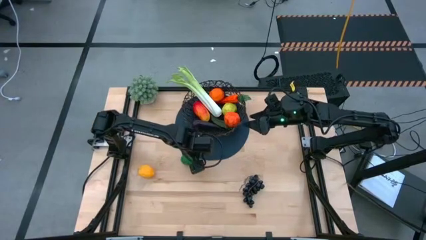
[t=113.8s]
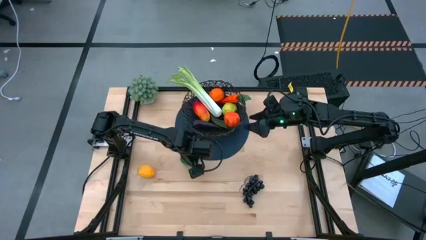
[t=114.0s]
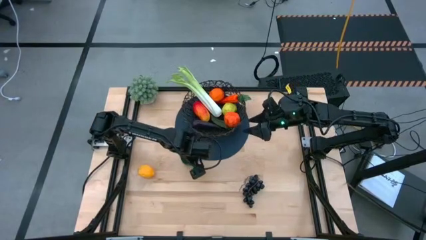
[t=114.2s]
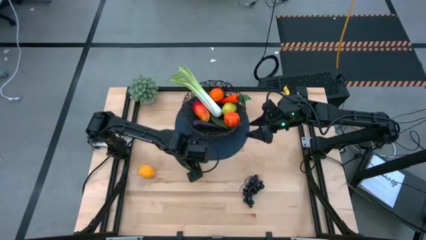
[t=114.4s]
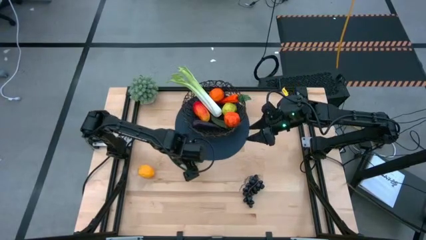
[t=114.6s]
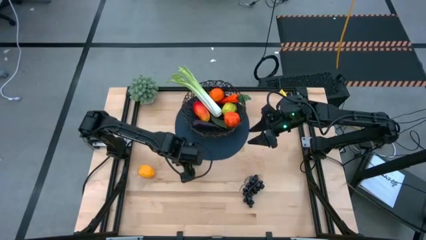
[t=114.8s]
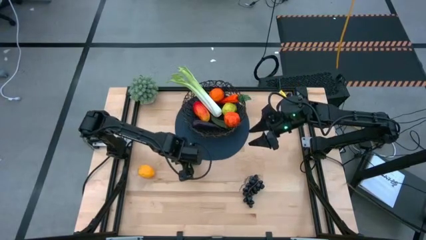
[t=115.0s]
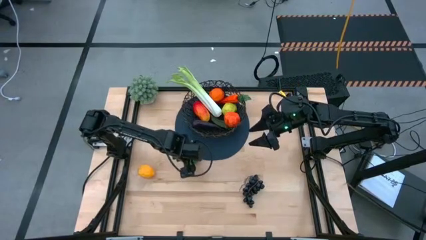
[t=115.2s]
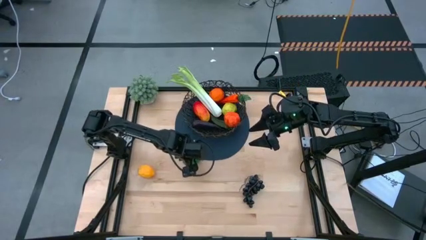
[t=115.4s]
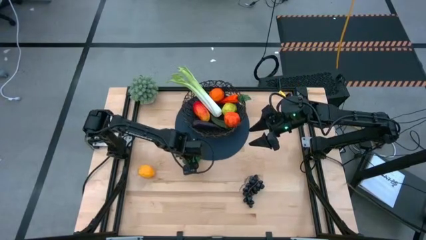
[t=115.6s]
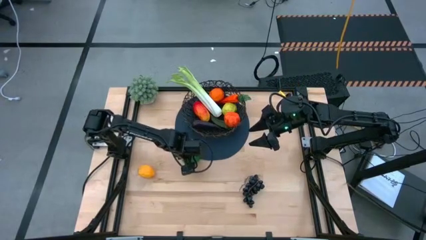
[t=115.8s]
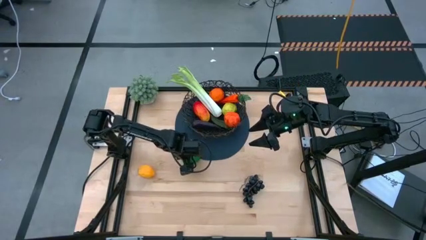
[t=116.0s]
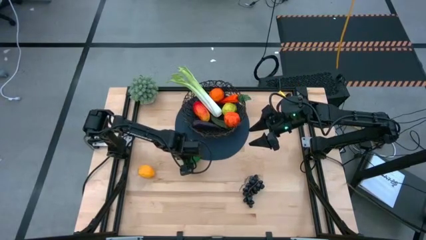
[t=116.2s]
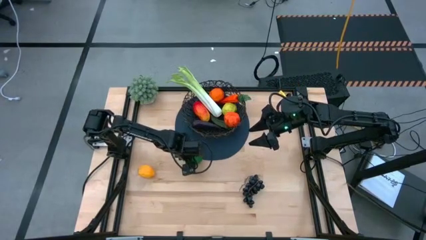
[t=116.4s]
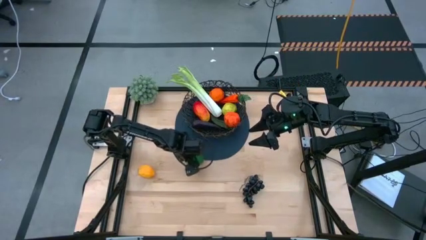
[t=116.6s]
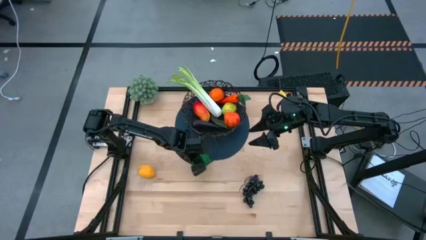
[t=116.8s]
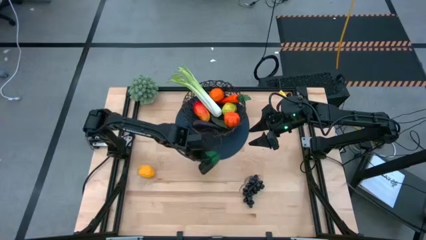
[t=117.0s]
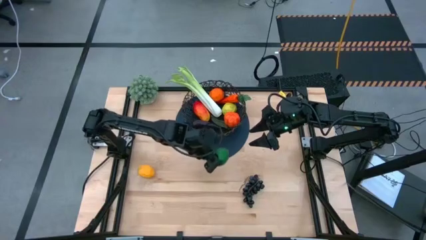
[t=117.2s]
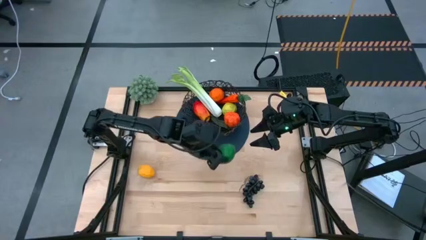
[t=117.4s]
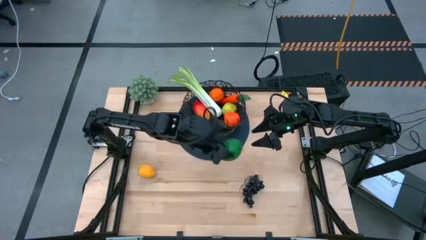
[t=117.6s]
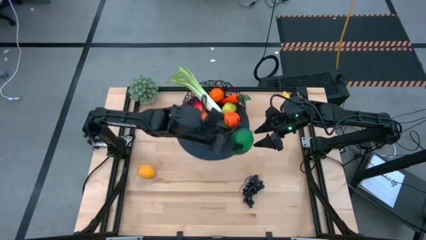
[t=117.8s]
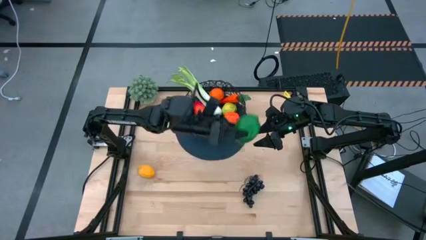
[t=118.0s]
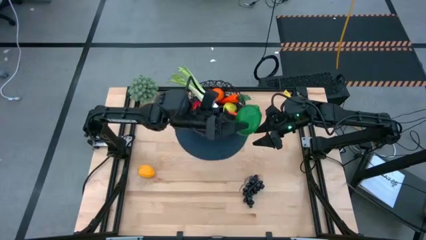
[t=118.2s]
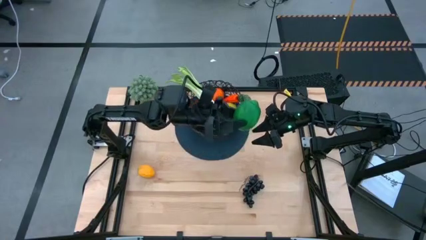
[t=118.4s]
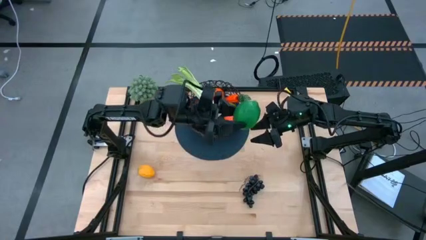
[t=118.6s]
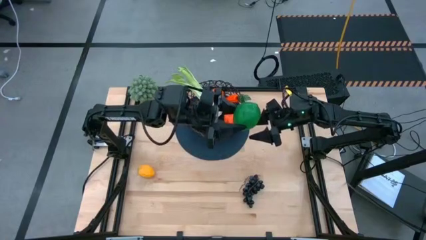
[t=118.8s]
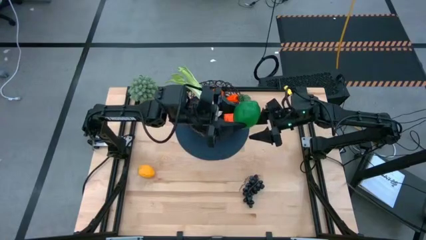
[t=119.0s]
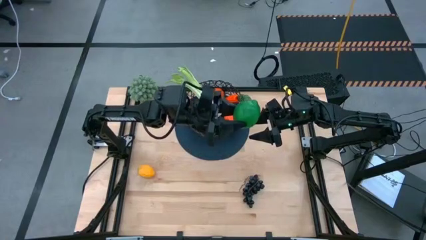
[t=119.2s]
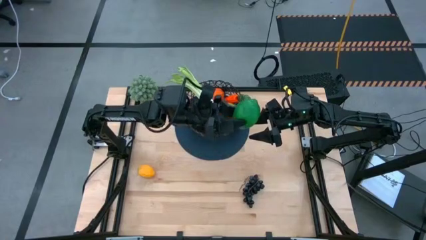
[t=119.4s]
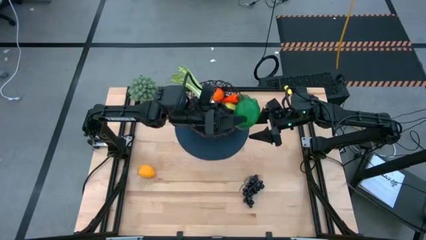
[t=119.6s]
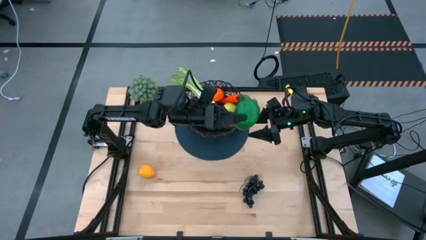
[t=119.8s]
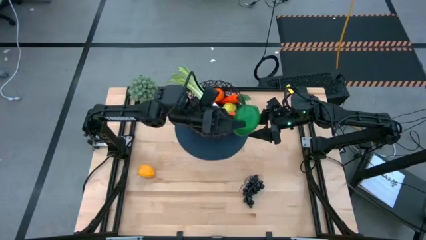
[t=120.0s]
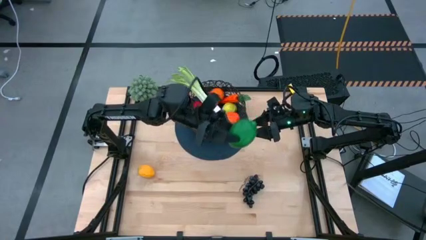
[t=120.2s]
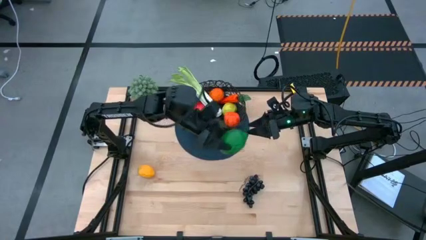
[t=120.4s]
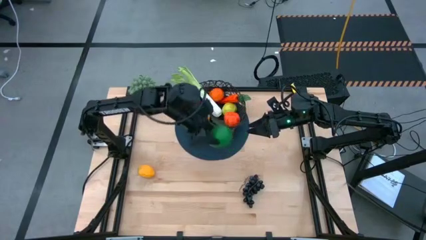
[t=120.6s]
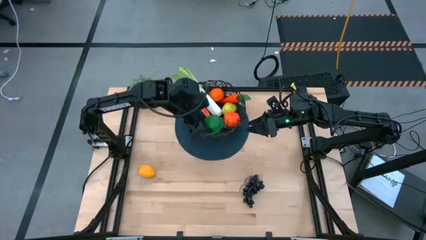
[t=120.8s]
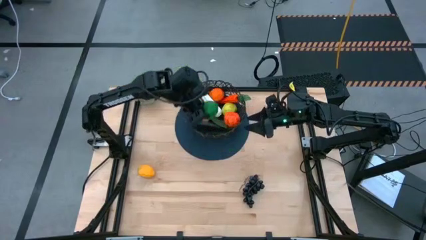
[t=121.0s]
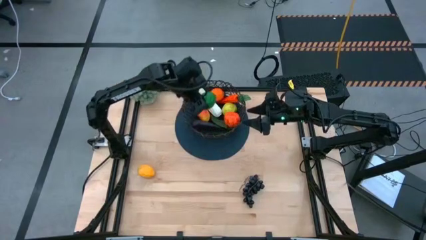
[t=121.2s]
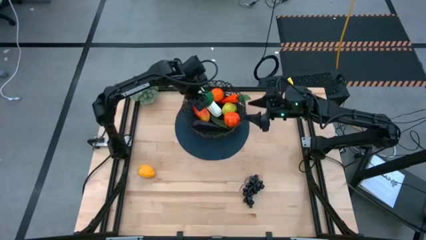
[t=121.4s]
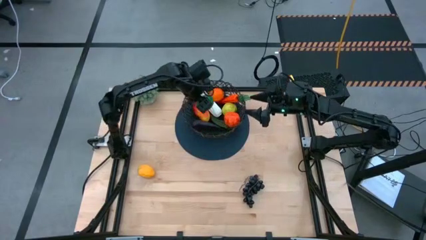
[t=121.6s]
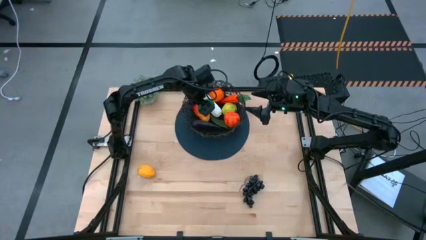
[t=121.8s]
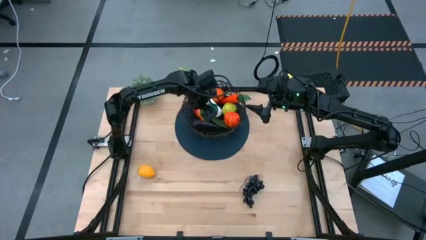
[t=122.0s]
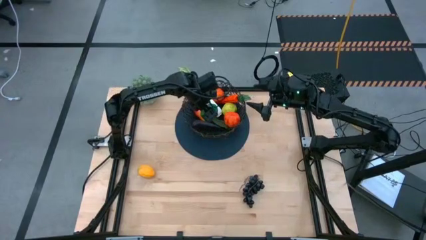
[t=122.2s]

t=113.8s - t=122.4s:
Task: Build produce basket
Put the green lime into the wire basket

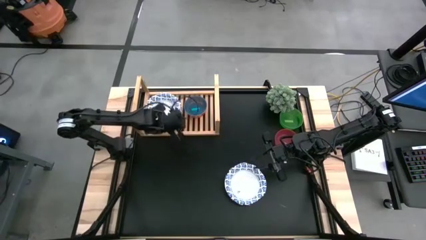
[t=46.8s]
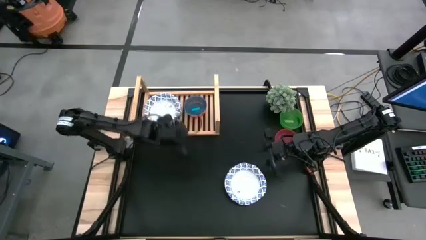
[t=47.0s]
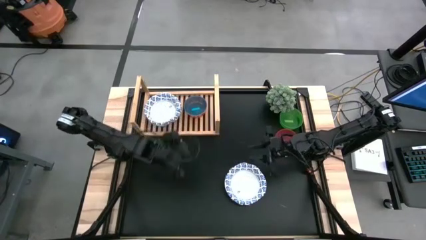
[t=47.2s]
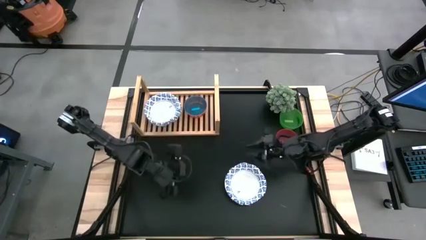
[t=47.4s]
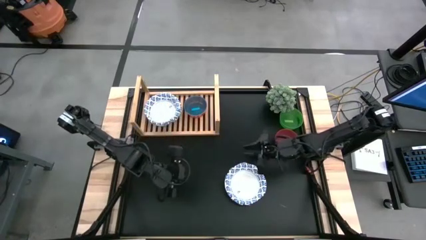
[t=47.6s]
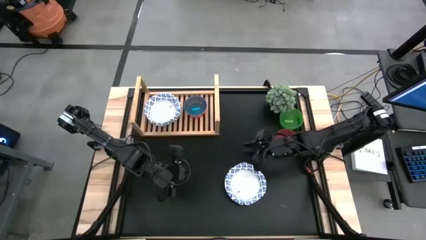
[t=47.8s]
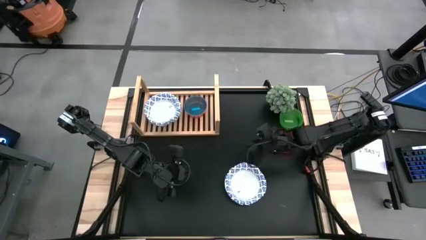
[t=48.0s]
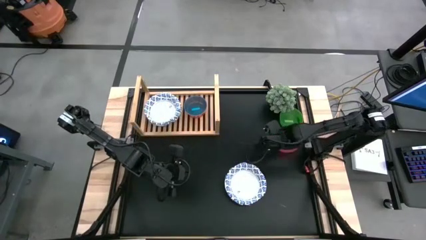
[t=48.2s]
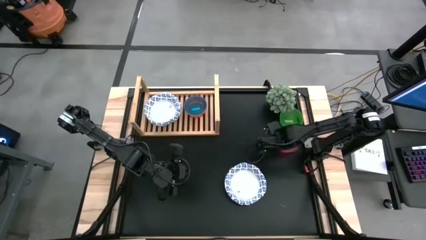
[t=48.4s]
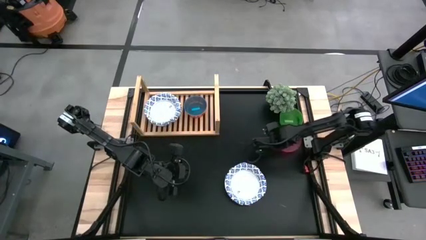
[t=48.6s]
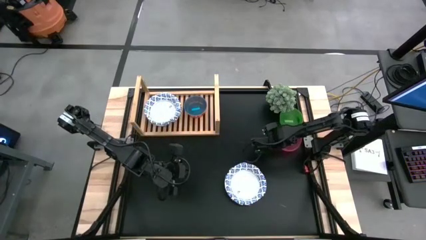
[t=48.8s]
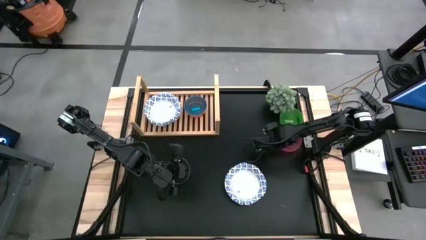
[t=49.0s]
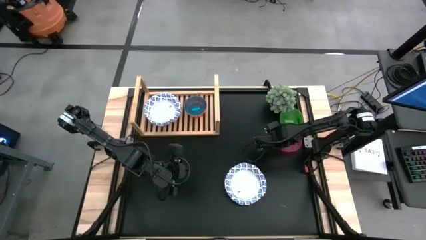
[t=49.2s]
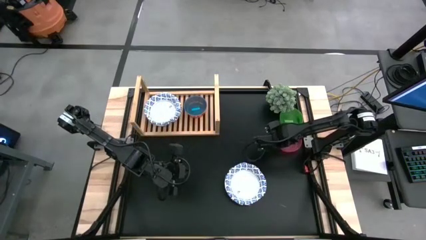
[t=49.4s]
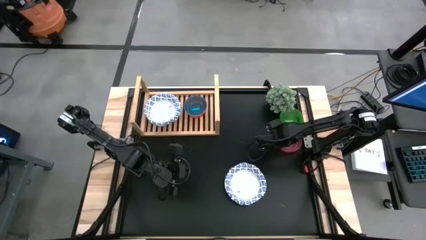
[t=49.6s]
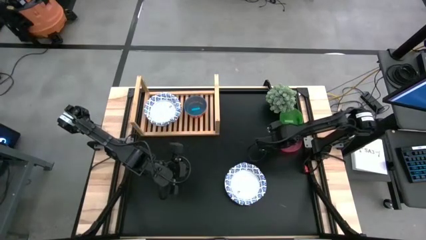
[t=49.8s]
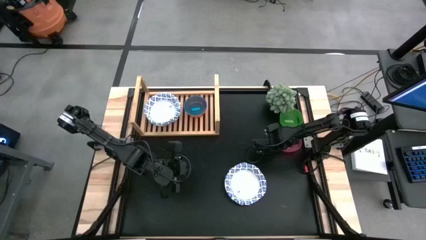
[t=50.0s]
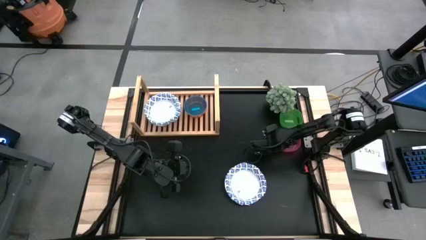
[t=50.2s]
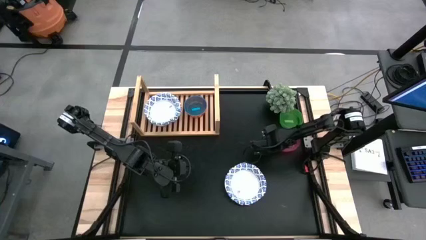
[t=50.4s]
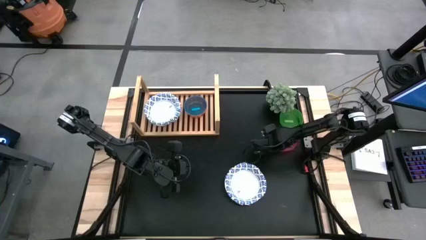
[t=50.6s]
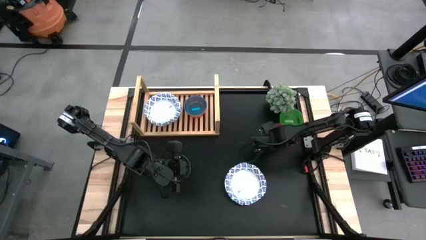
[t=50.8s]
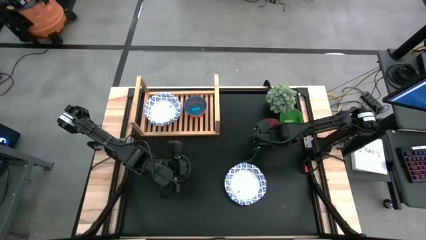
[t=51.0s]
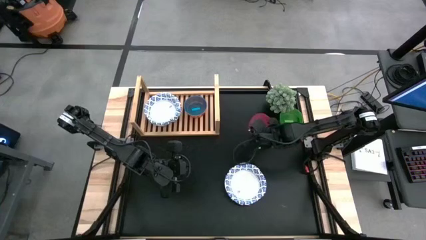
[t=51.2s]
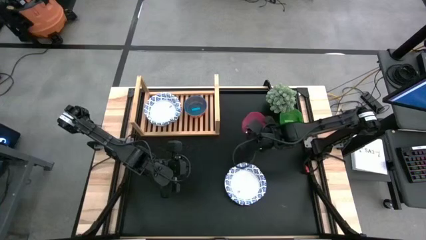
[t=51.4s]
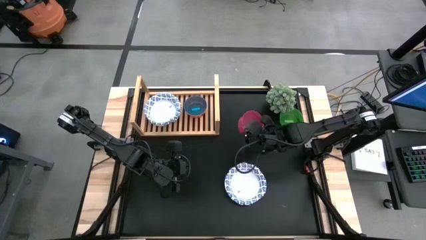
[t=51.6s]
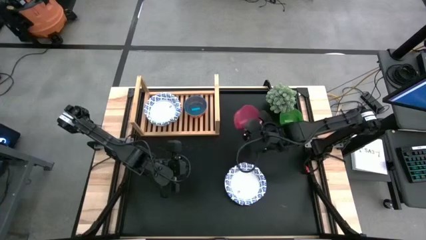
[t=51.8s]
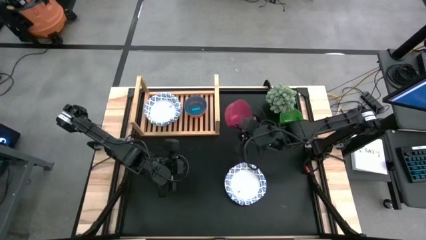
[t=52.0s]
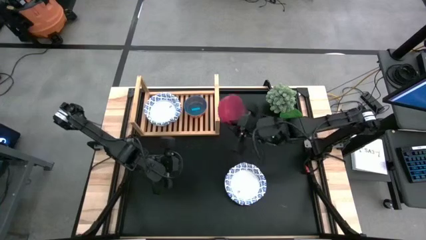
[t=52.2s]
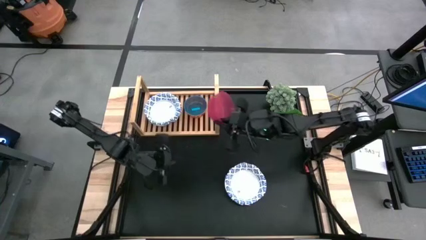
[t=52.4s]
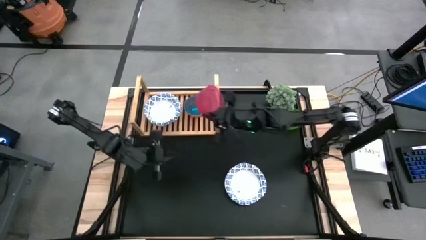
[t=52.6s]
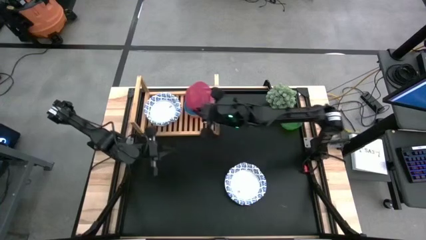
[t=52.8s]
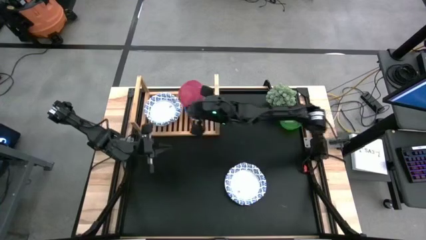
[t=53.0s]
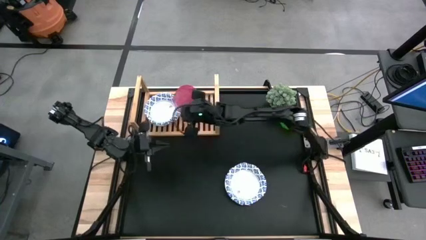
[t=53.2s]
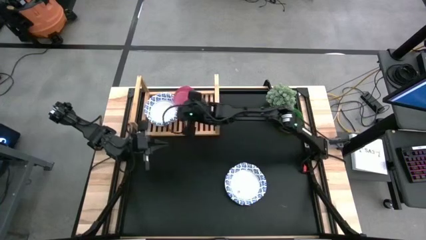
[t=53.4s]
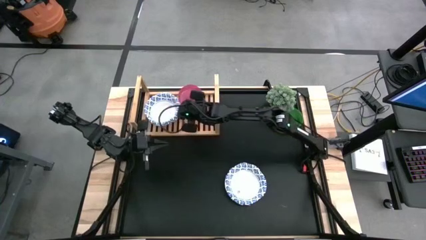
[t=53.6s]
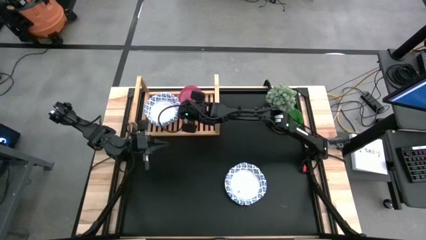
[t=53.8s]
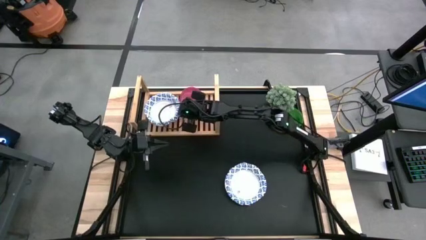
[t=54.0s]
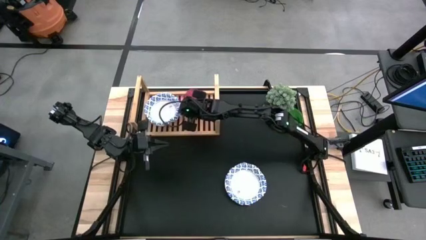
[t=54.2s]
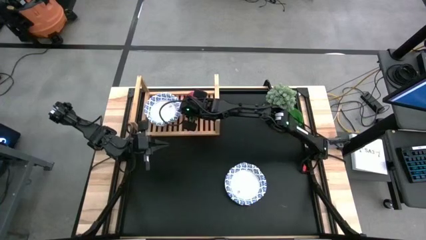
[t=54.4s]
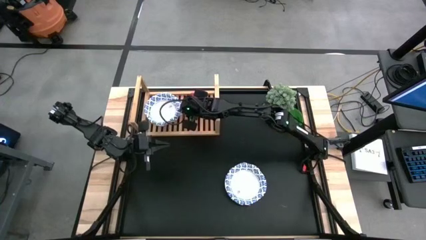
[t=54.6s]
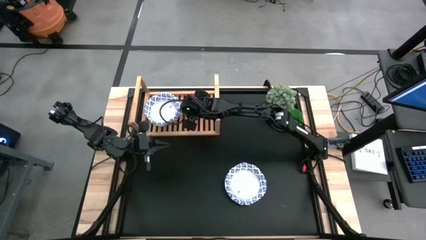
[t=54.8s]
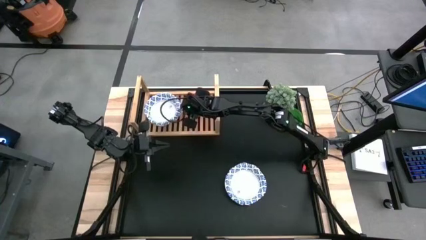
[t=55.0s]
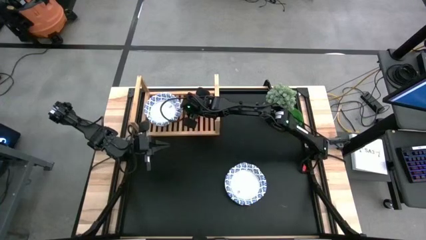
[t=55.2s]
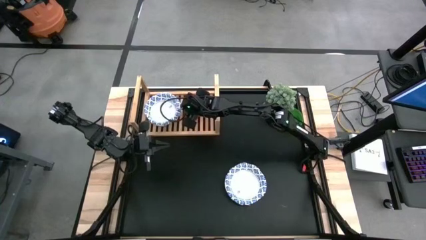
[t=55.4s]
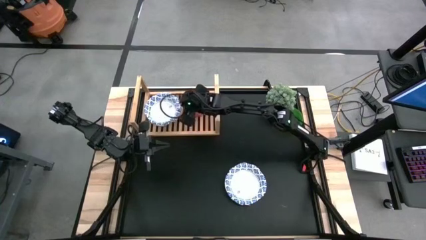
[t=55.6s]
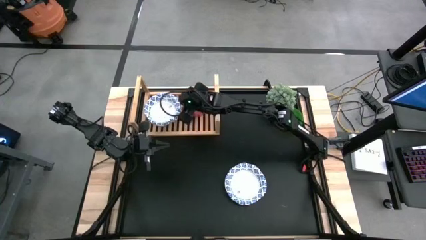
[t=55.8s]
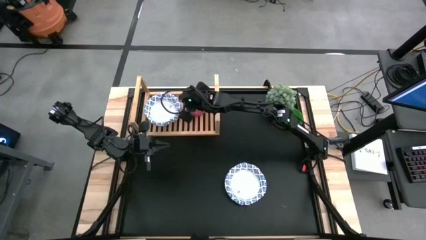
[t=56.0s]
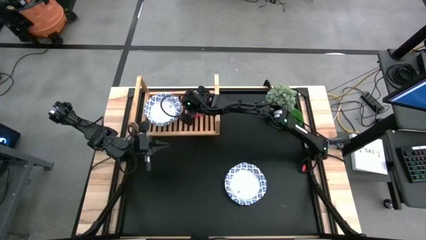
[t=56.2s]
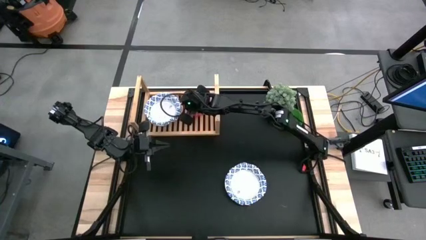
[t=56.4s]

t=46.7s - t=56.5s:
Task: Place and stack plates onto a shelf
Stack the pink bowl on top of the blue bowl
